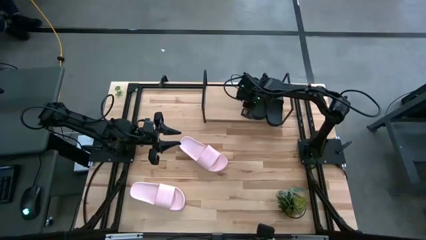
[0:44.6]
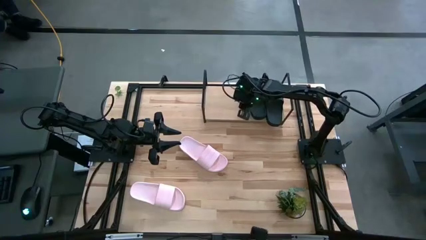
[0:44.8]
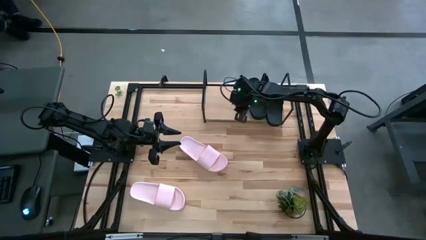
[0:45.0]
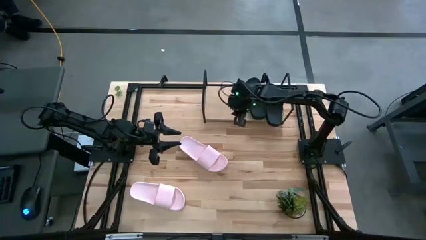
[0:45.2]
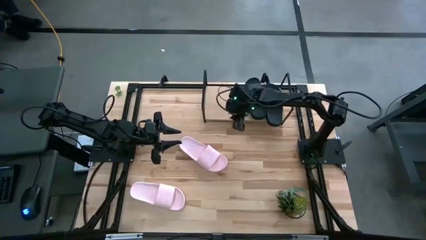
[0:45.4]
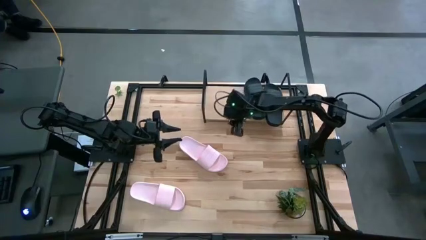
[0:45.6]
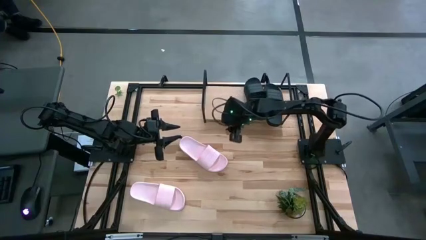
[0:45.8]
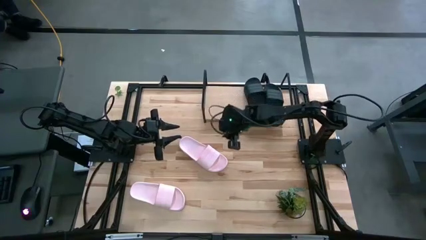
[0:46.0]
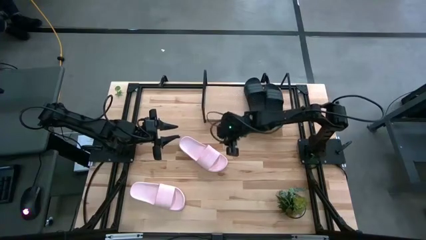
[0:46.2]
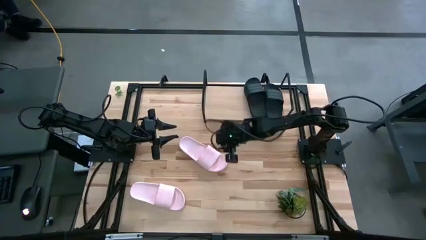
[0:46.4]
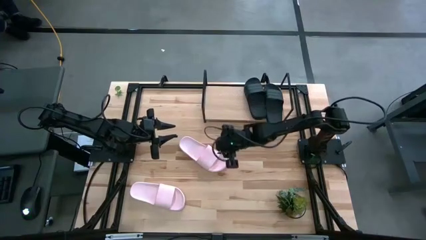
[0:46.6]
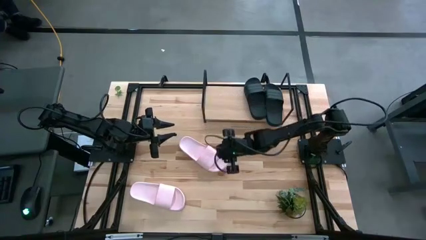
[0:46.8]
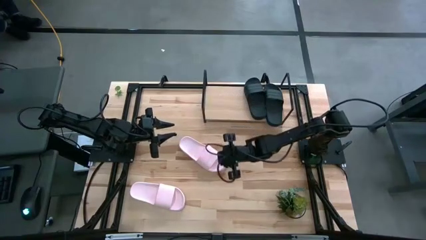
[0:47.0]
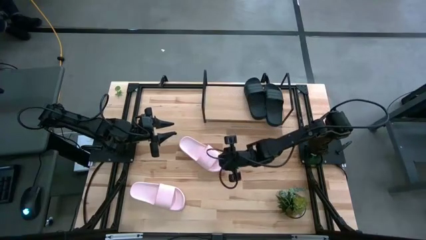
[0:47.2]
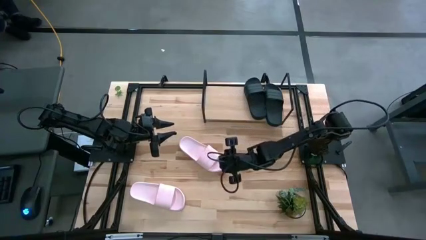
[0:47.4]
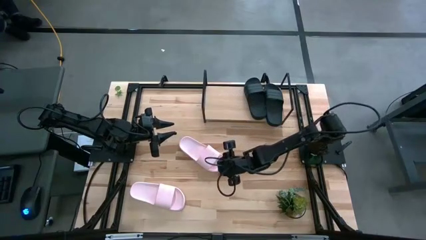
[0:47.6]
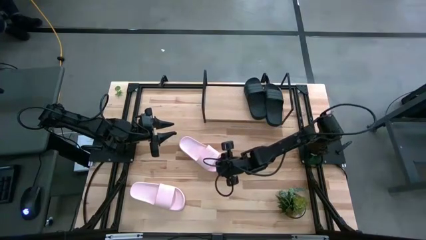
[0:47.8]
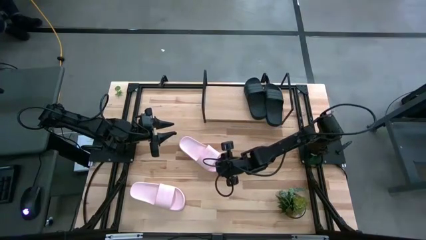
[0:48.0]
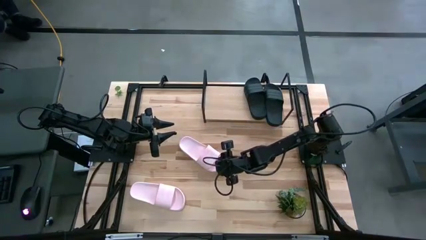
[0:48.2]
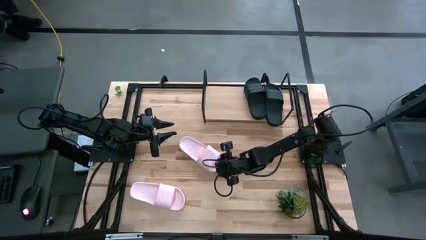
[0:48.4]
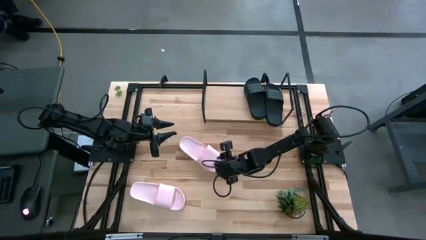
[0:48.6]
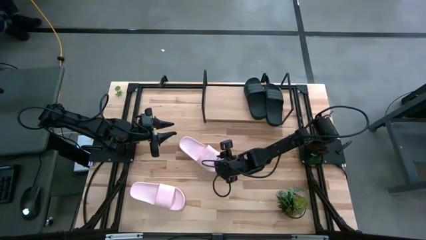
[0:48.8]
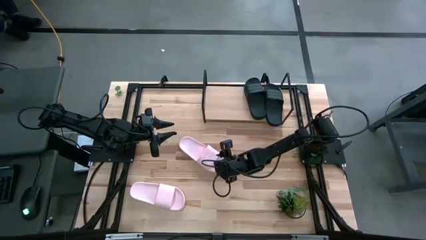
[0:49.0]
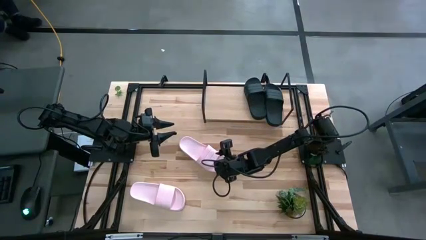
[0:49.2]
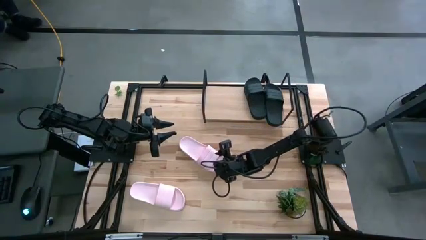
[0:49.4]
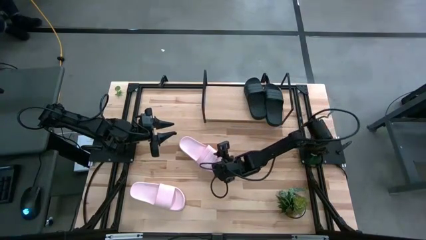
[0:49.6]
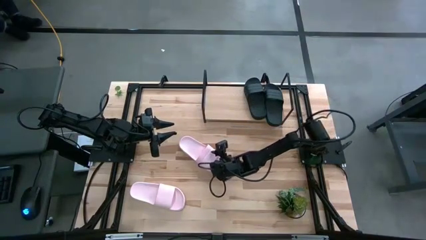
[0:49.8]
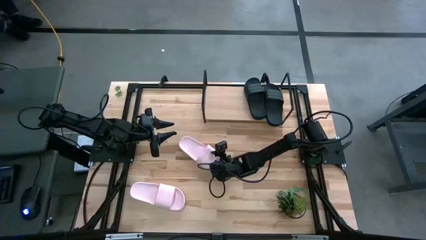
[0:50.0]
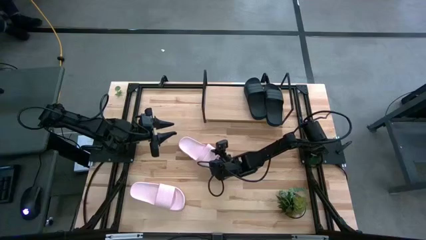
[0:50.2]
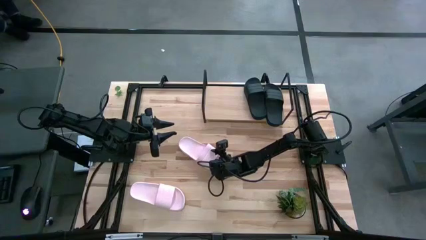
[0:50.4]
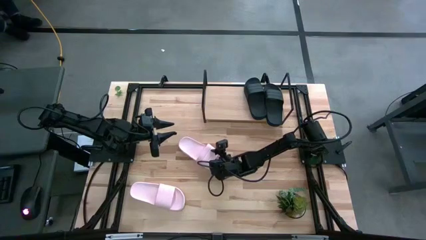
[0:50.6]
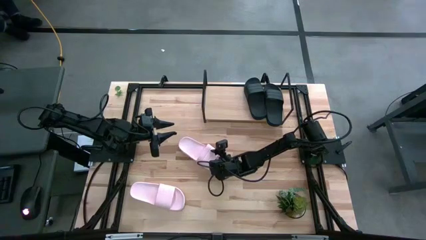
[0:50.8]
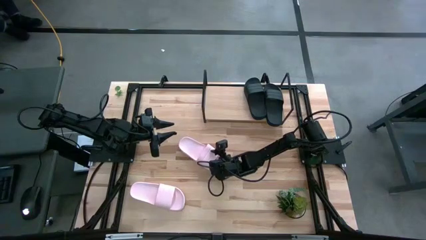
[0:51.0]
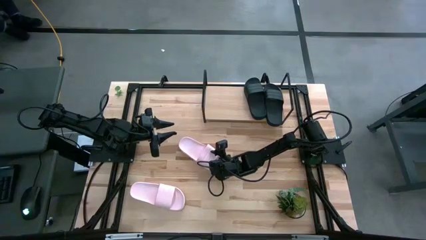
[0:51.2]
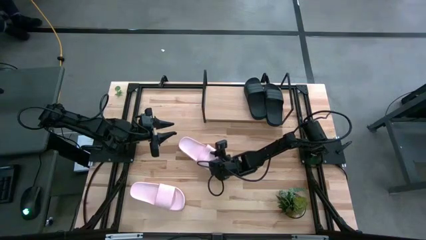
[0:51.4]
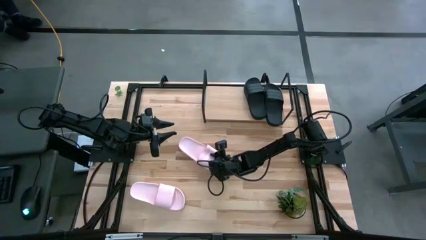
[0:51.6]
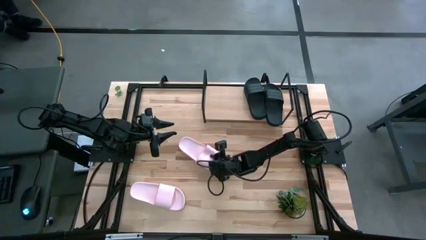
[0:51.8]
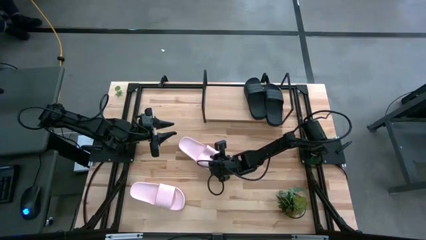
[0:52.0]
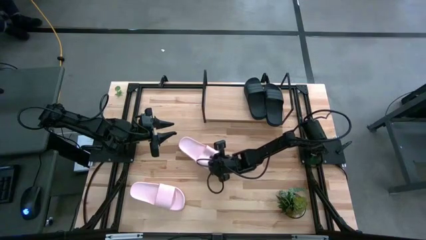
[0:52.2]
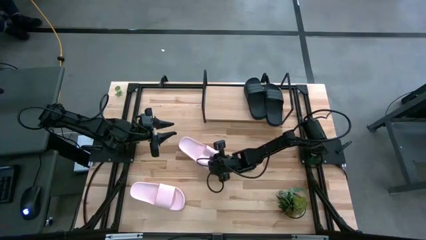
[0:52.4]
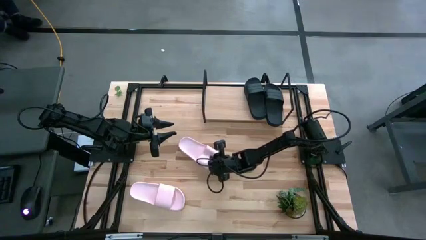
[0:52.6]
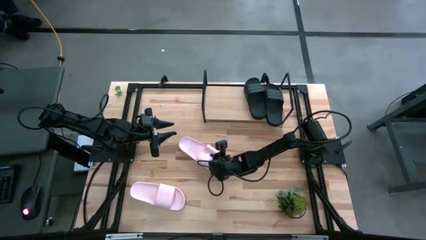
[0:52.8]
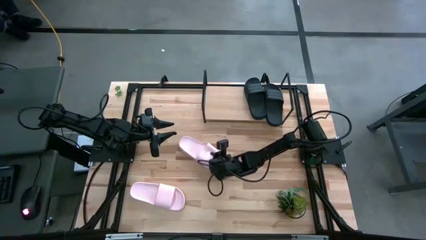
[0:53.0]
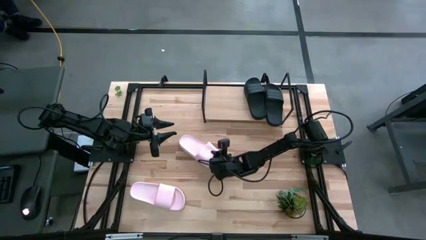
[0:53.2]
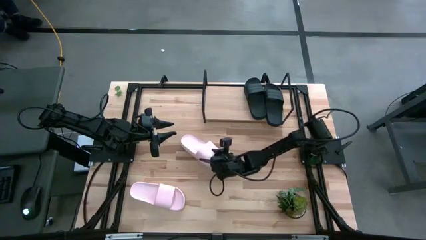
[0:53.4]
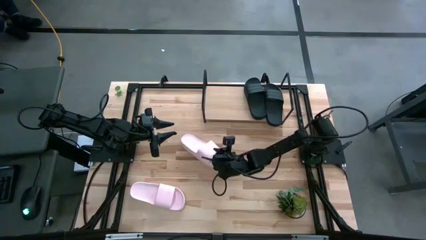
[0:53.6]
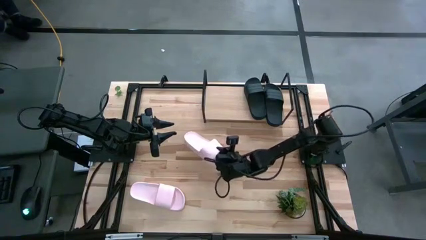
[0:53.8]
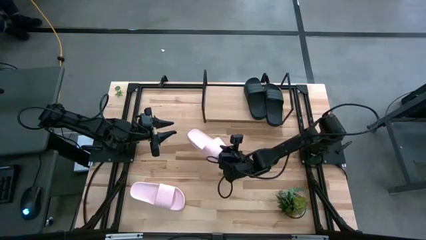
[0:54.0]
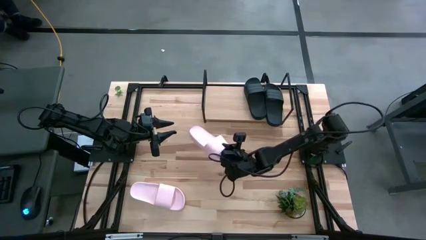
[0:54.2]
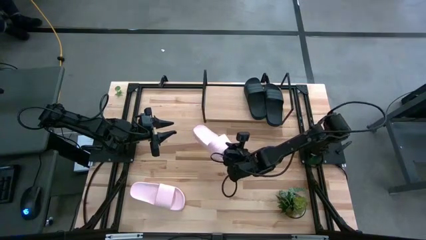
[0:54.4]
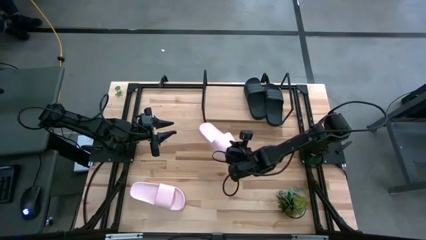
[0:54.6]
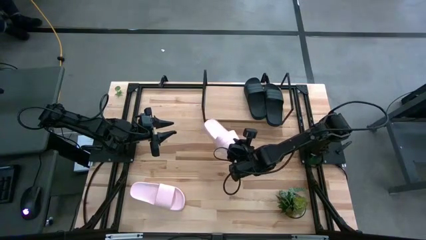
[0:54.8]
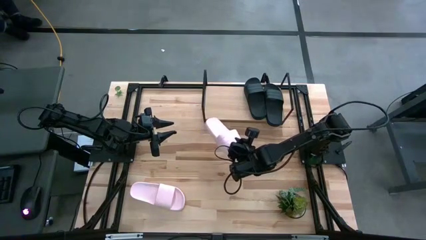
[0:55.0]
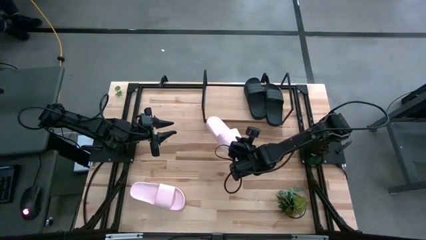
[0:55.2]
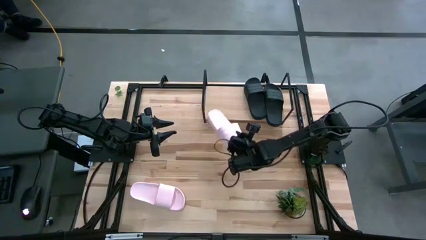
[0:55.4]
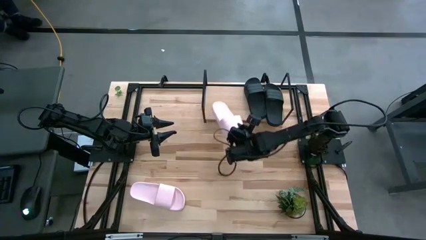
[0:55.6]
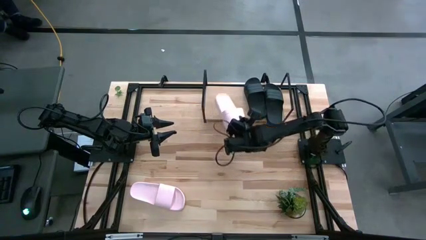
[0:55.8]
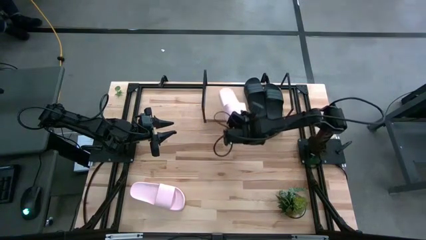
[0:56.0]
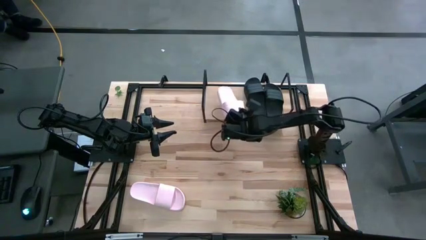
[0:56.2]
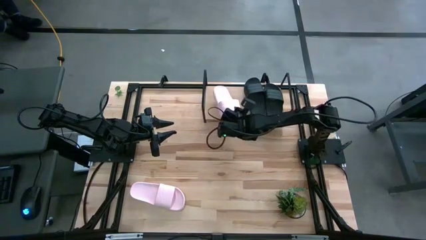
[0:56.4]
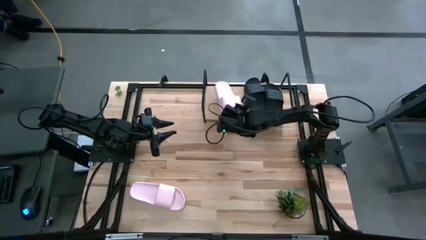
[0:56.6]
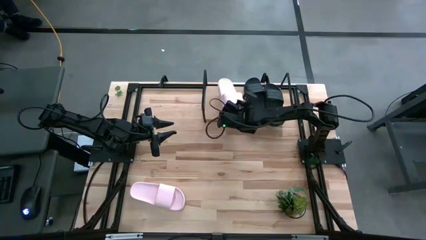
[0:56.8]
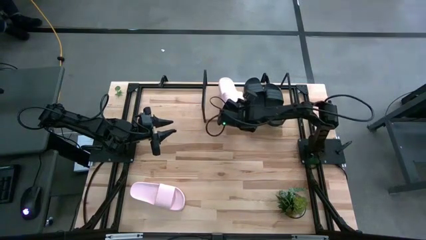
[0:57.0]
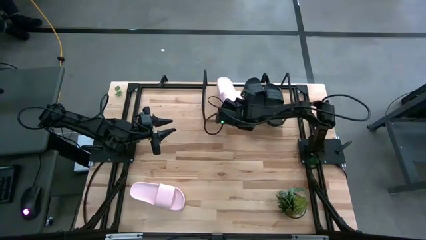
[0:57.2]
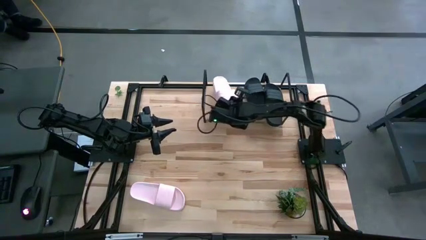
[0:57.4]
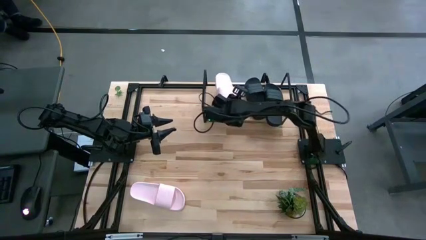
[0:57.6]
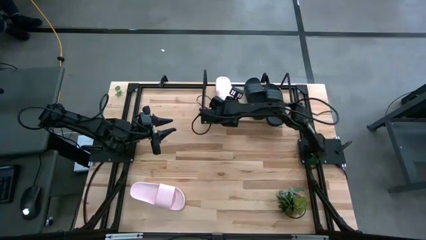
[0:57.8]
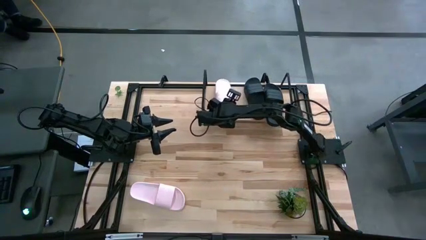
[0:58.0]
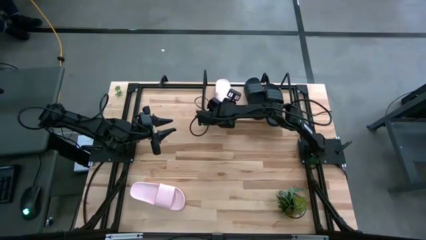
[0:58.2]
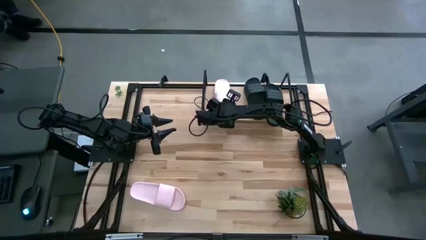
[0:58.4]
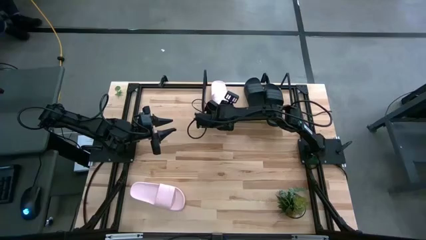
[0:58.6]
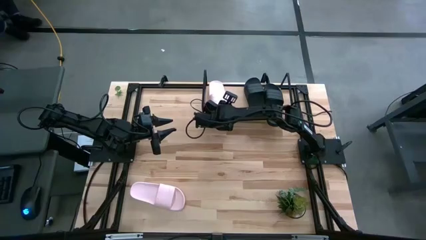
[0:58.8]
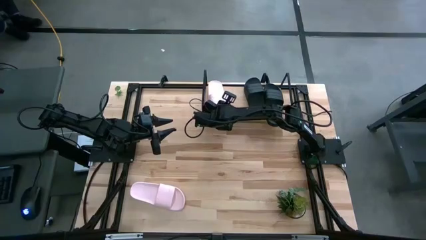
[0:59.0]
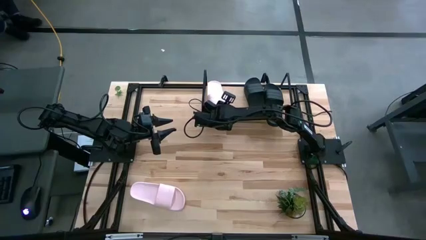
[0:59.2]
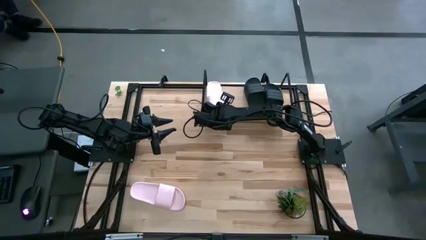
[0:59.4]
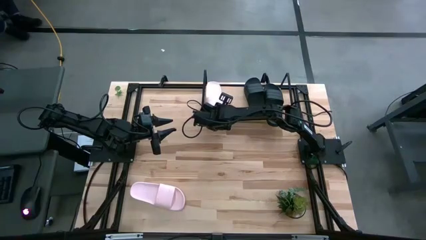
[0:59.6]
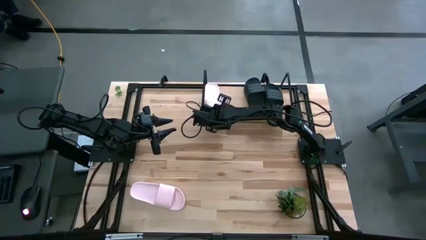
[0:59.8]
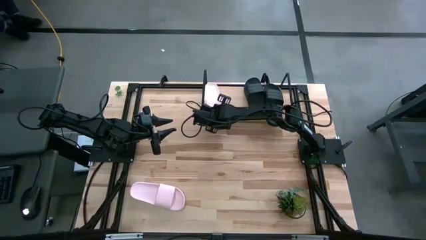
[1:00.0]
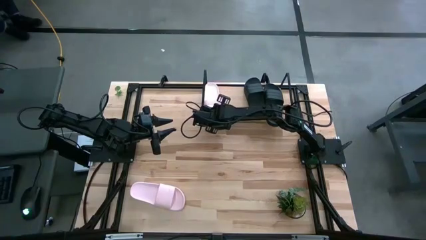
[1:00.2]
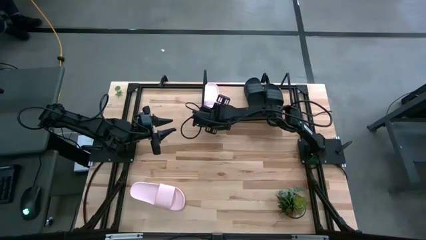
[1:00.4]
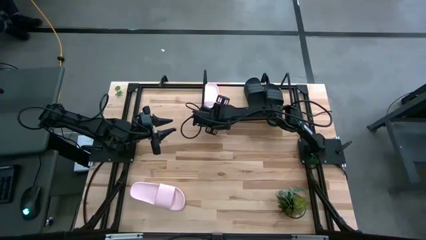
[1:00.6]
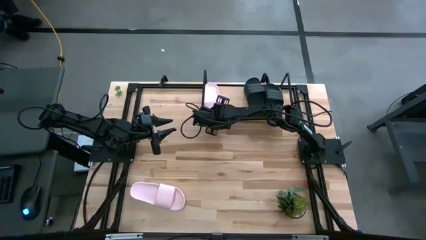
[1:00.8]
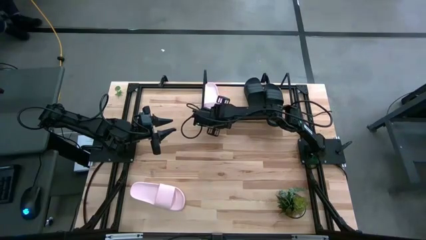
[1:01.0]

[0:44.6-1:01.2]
Task: Pick and place slides into the shelf
Put the top pink slides on the shelf
